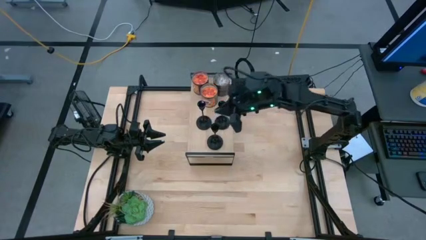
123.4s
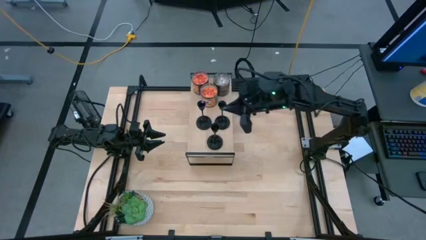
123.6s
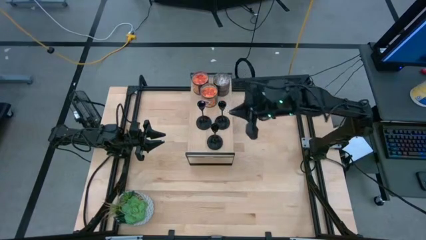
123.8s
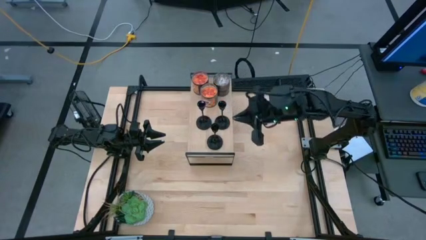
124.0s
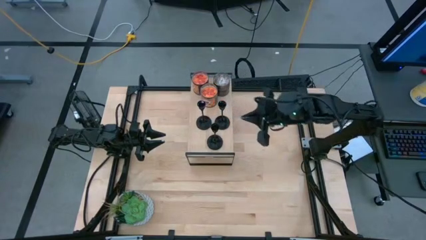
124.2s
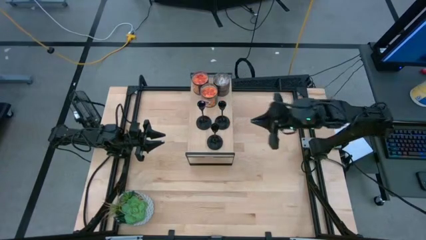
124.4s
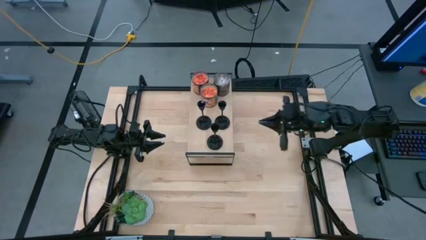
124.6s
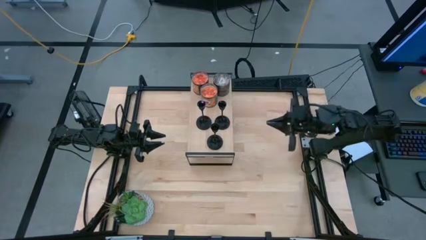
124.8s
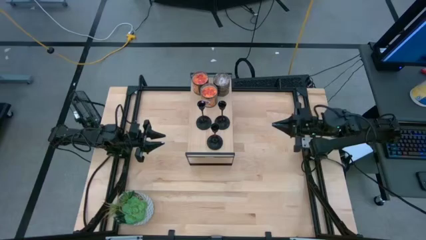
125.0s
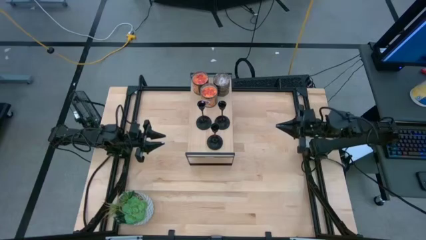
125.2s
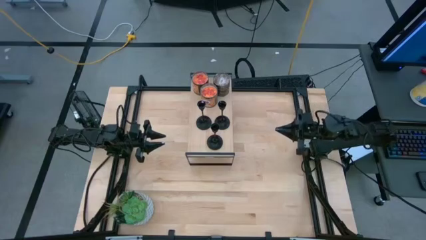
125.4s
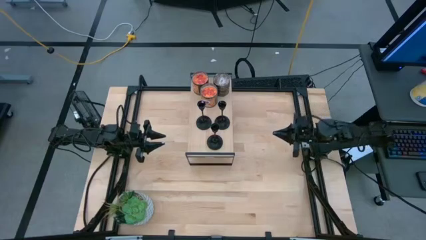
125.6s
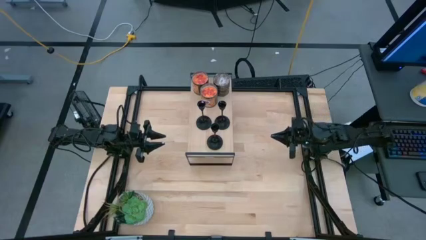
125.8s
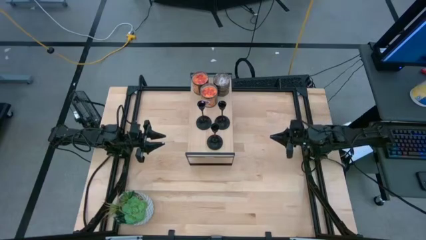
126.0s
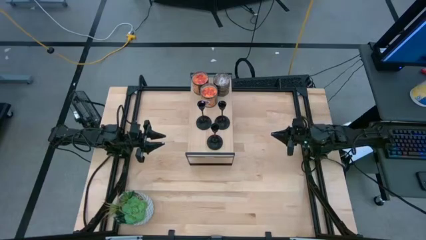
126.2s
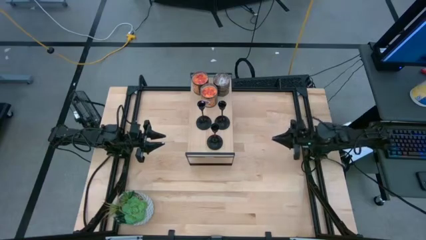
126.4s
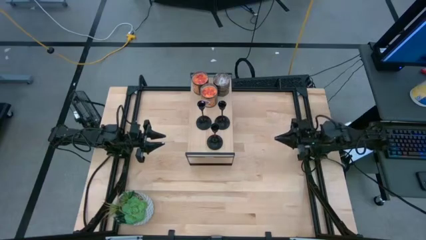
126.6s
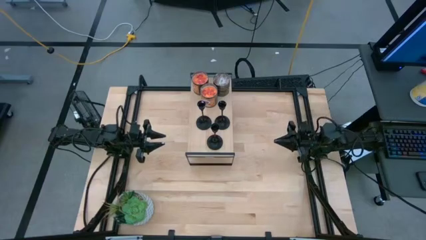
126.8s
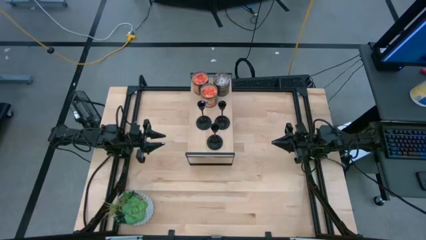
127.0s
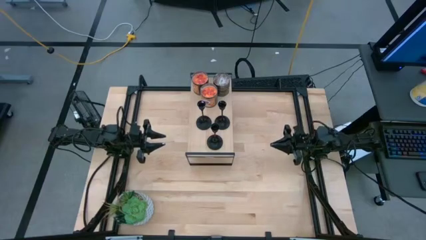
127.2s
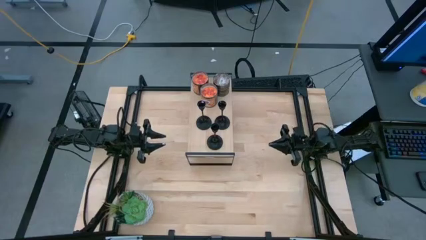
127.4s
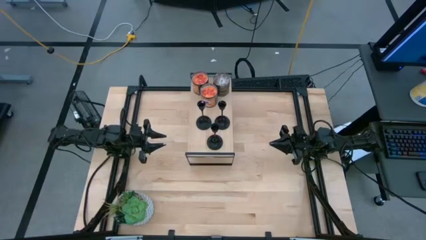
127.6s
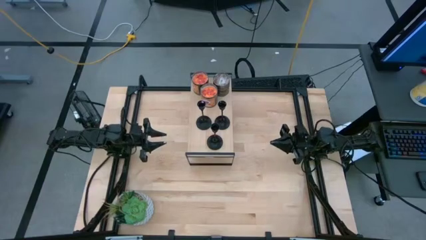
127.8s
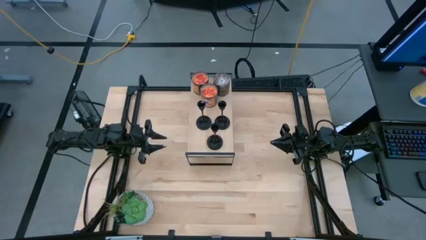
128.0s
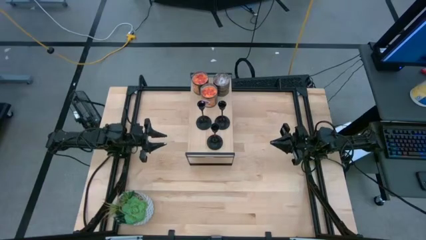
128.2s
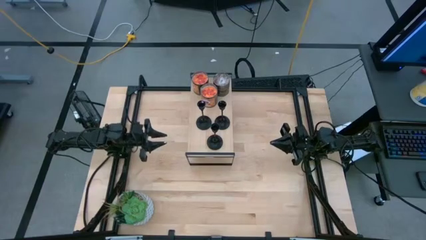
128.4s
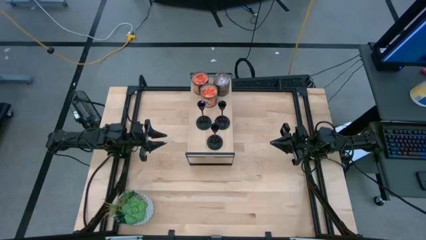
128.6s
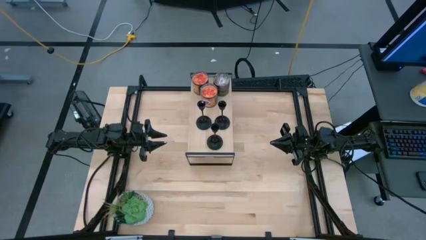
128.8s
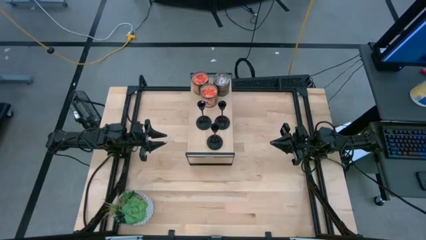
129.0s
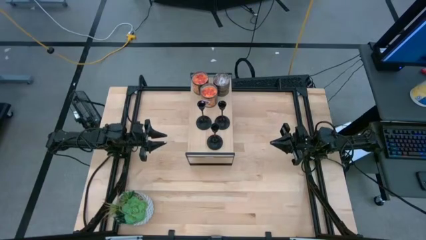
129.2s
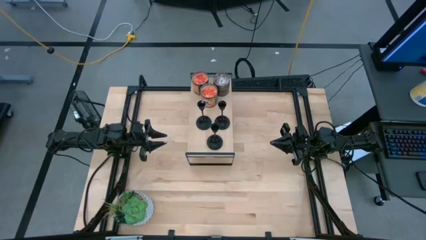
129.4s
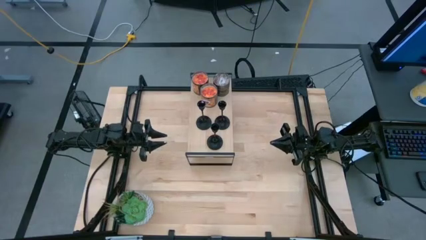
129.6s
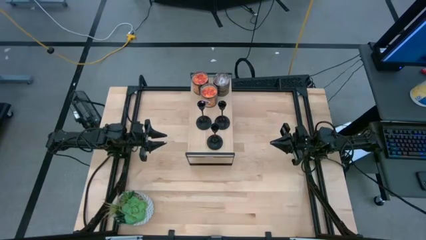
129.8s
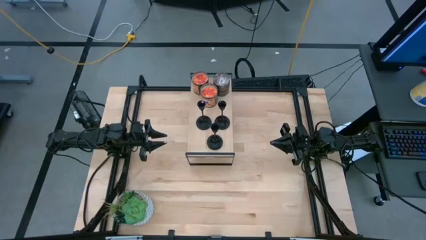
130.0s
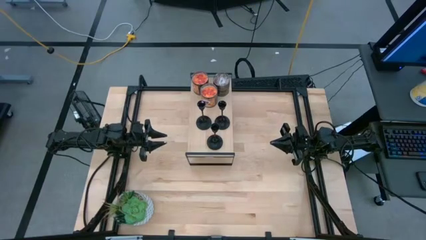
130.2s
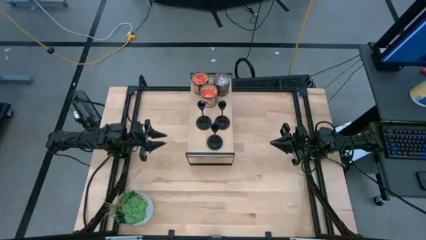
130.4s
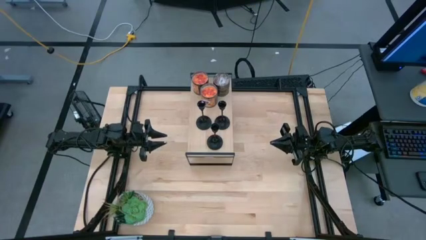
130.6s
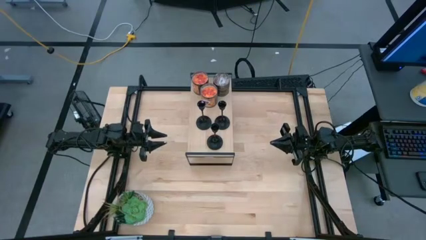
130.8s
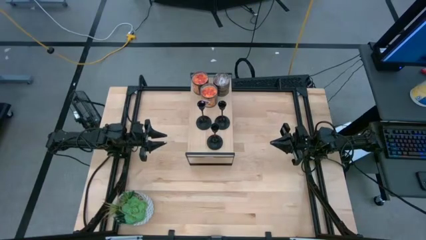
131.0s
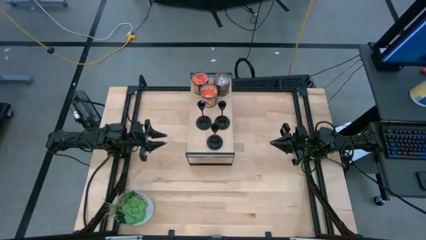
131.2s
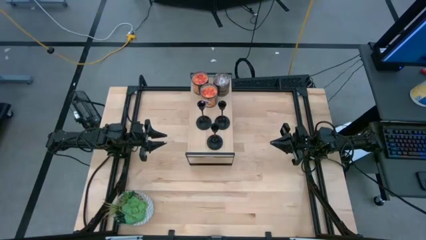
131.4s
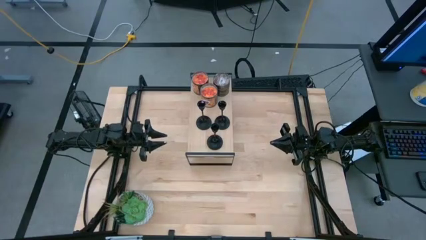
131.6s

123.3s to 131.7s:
Task: Pick & Place candle stick holders
Return to Home Position

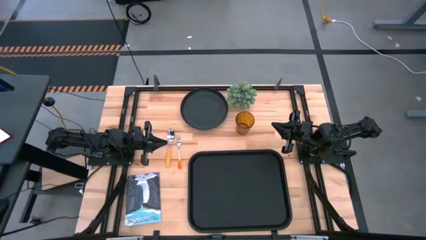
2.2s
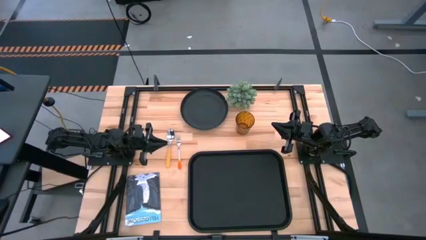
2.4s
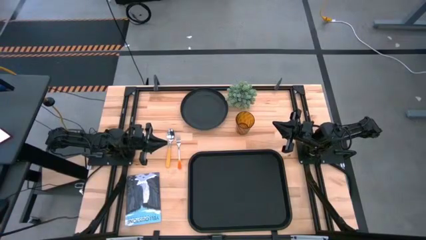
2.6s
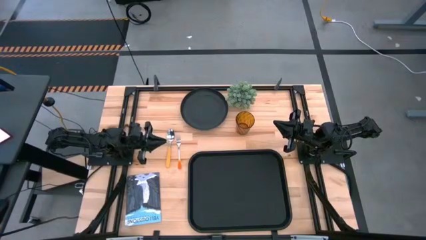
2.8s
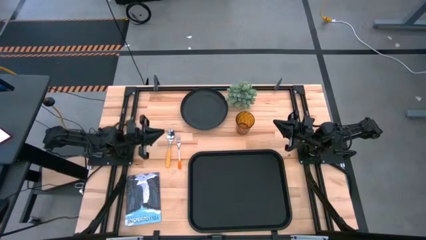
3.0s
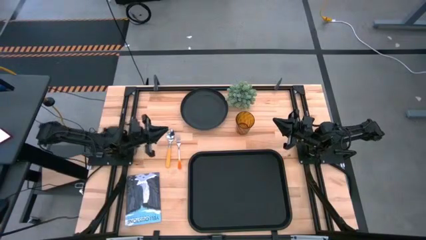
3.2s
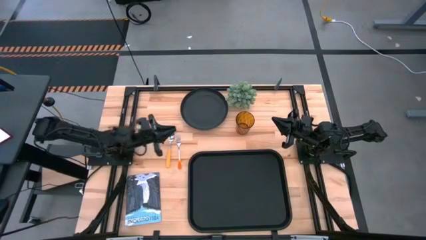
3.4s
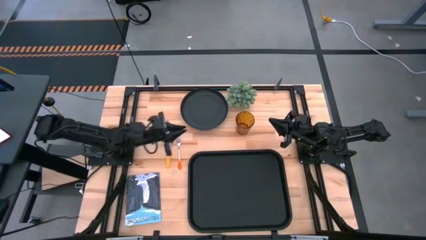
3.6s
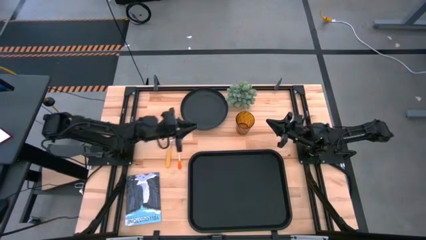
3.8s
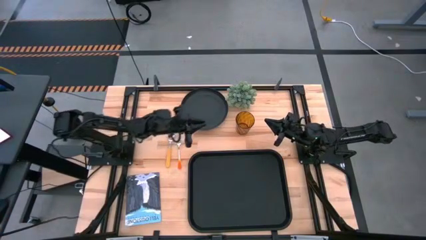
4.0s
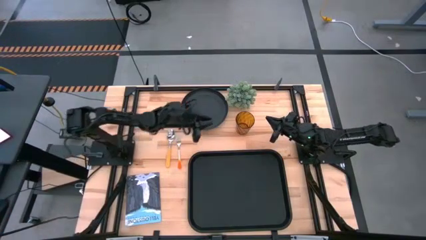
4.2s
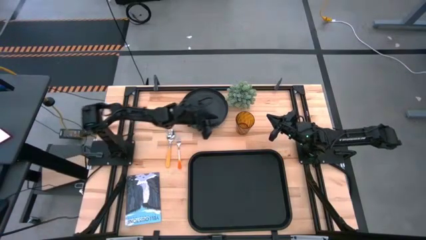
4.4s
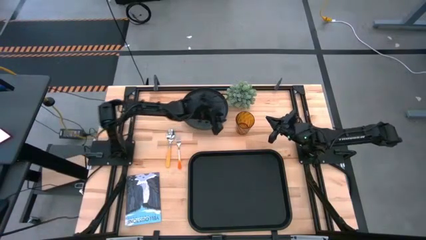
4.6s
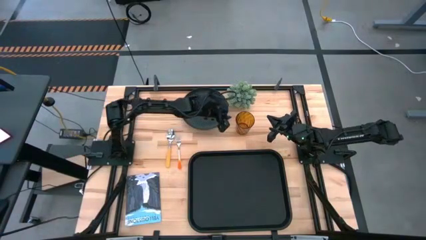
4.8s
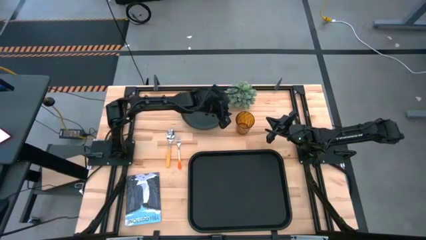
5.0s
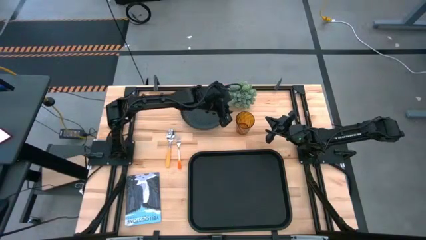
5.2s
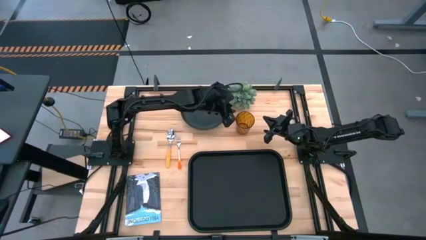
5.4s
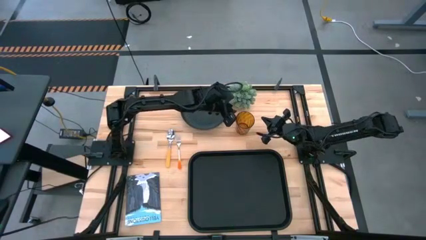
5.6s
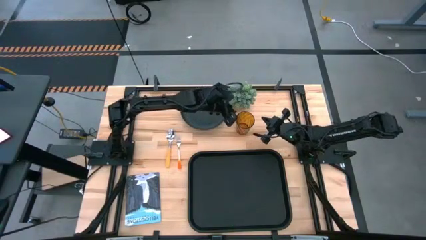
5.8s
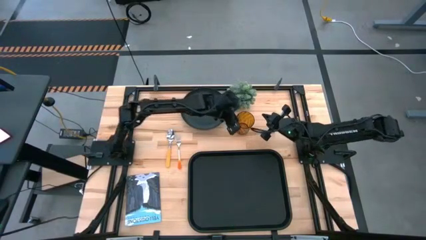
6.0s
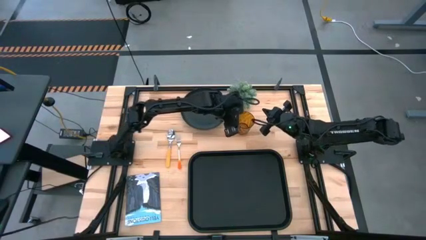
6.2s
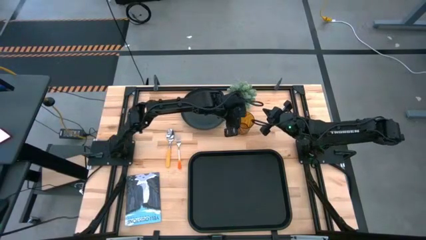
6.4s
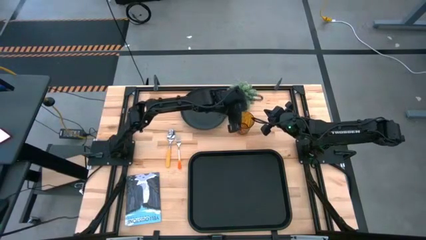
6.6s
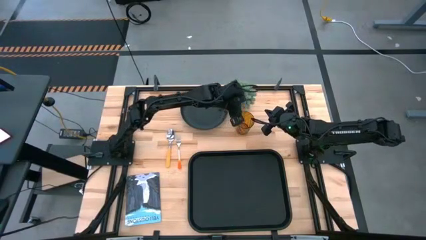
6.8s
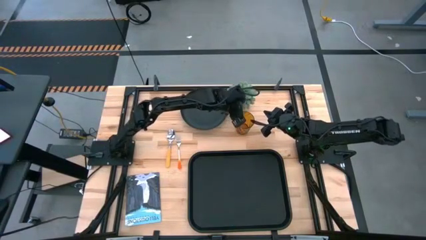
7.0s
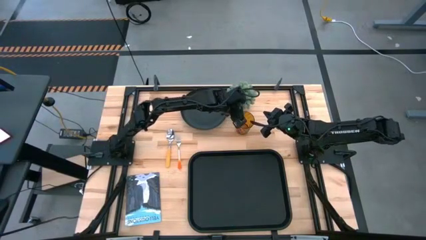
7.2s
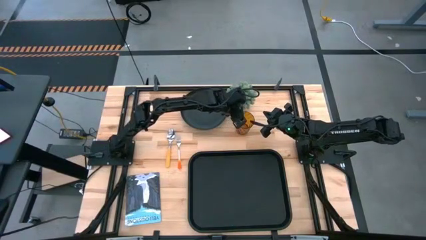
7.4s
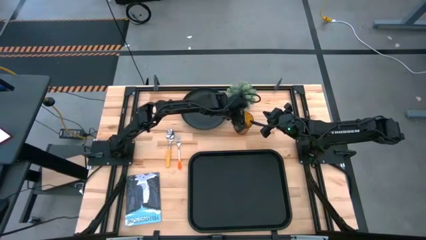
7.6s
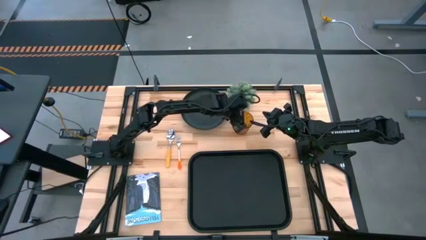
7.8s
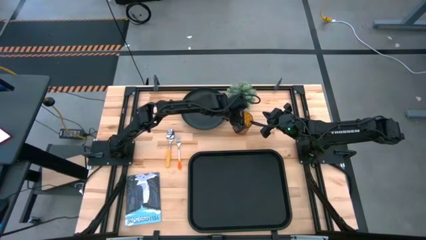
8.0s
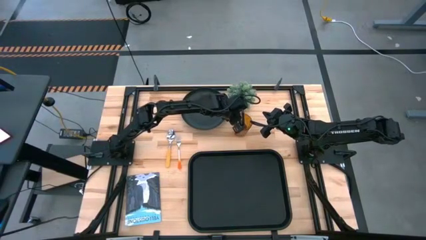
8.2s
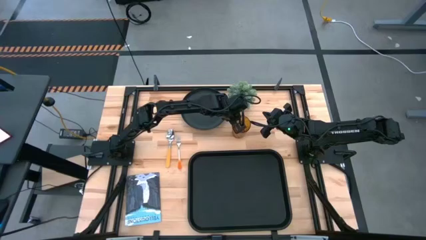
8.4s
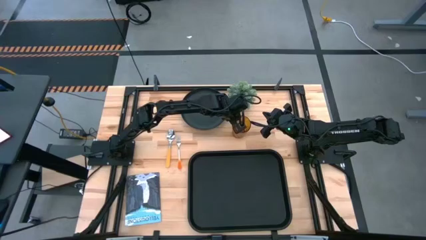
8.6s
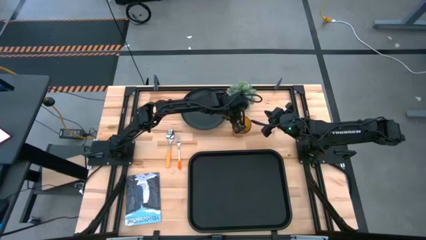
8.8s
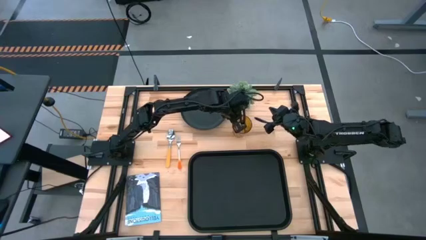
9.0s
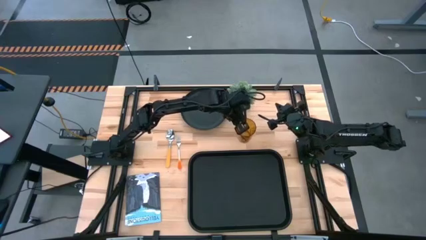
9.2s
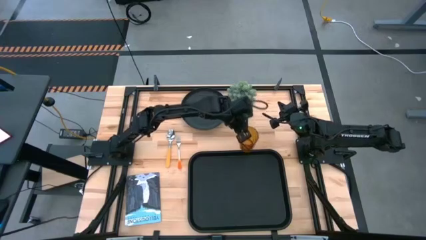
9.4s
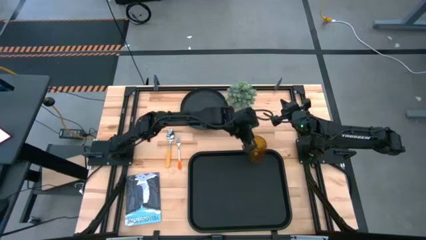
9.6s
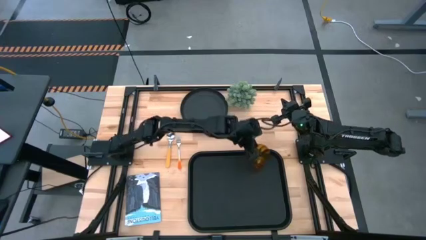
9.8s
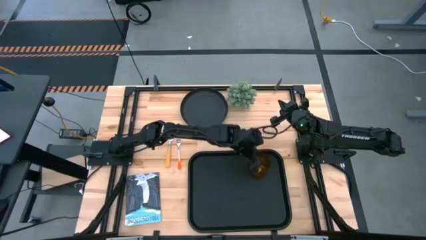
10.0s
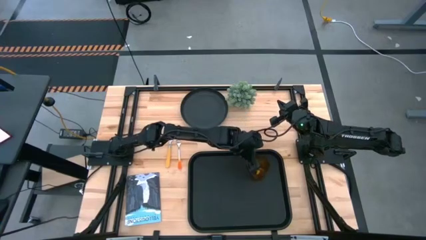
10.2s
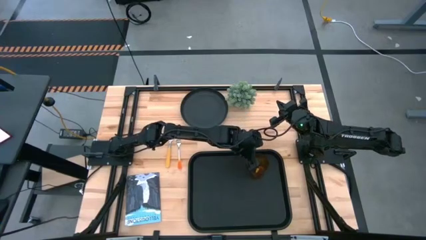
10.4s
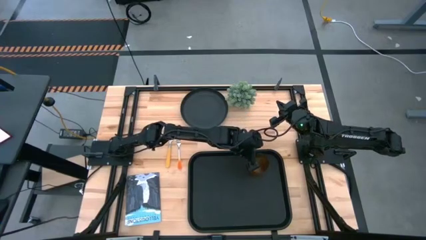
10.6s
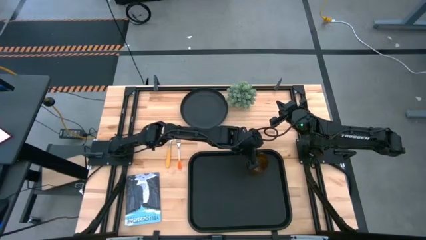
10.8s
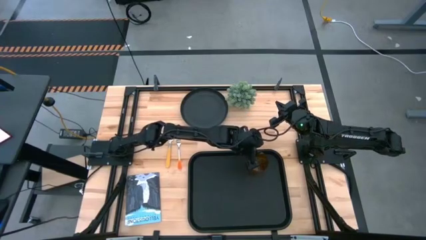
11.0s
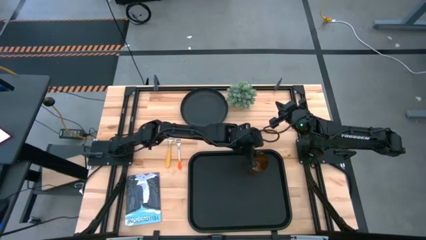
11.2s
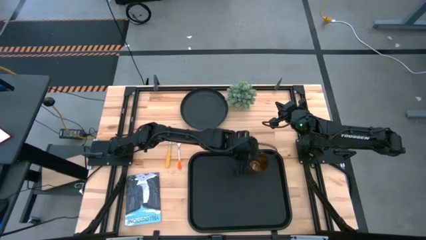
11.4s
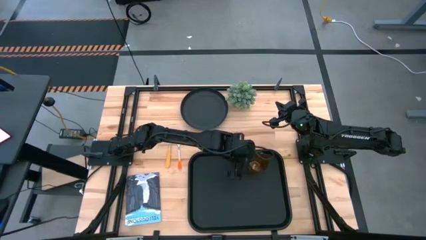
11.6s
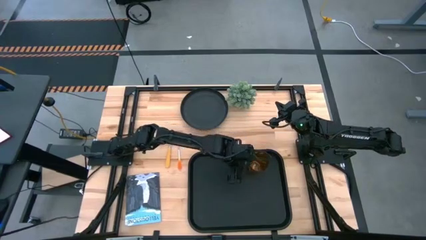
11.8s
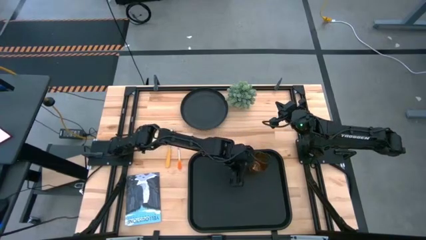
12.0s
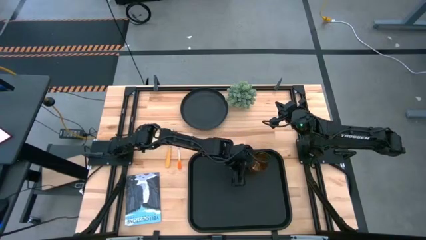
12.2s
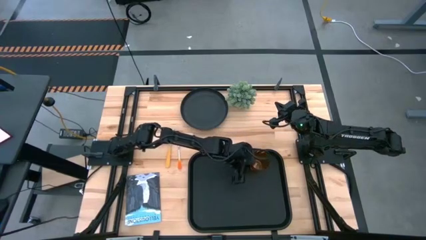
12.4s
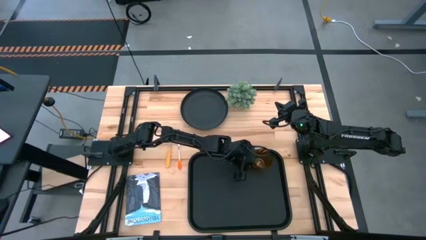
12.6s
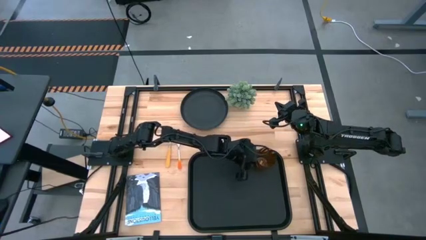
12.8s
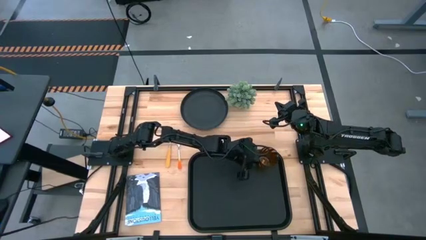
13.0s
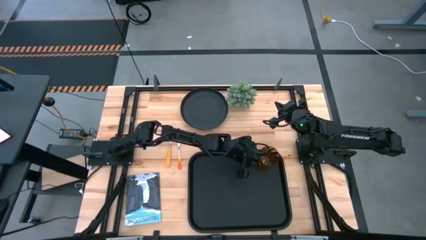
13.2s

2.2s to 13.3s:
Task: Pick and place plate/cup/fork/spoon on tray
Put the orange glass on the top right of the black serving tray
